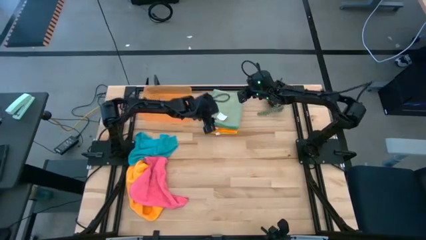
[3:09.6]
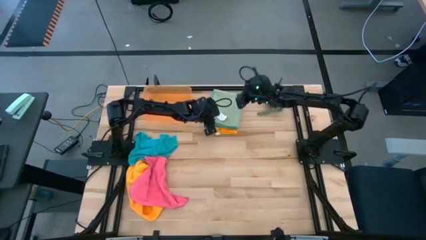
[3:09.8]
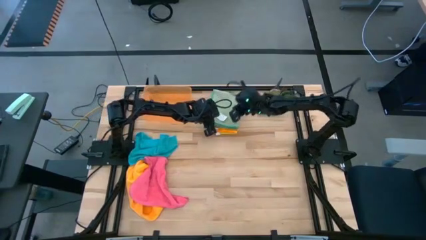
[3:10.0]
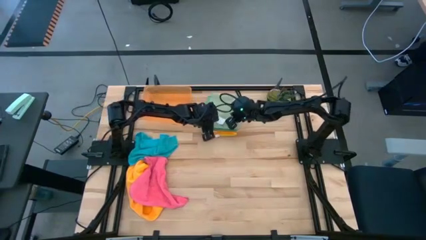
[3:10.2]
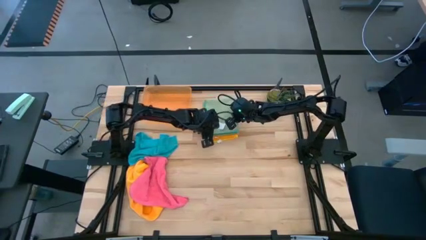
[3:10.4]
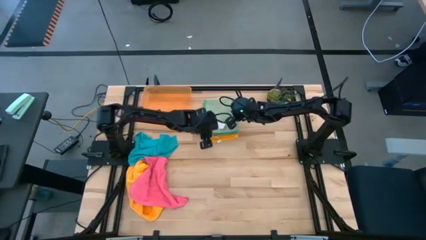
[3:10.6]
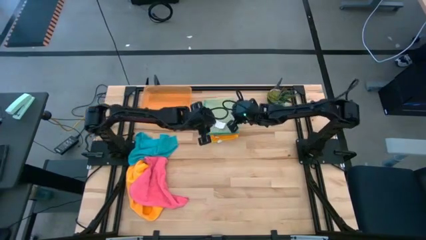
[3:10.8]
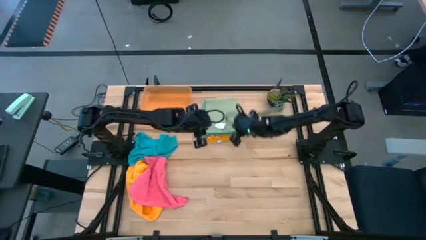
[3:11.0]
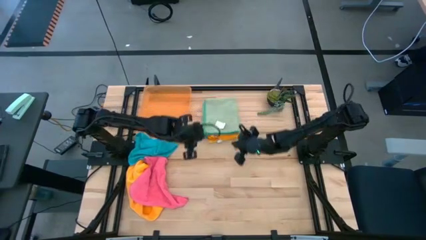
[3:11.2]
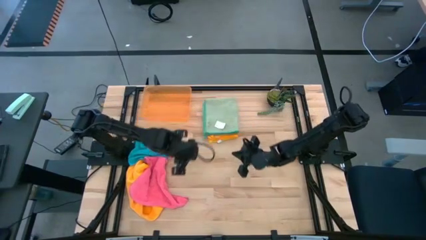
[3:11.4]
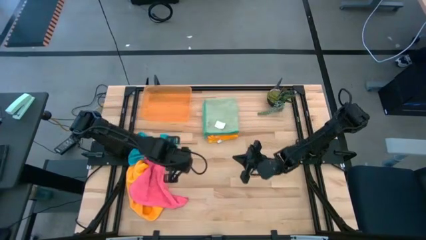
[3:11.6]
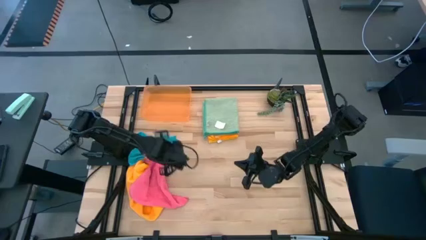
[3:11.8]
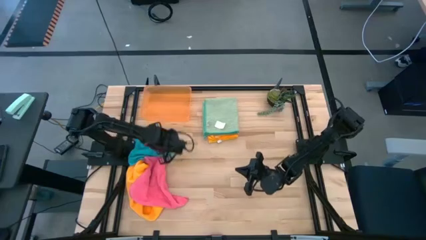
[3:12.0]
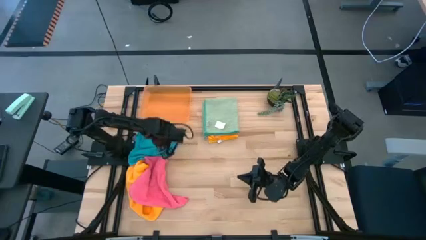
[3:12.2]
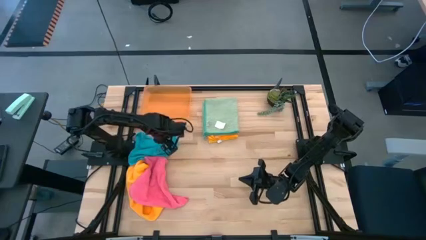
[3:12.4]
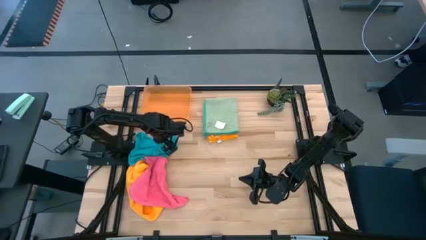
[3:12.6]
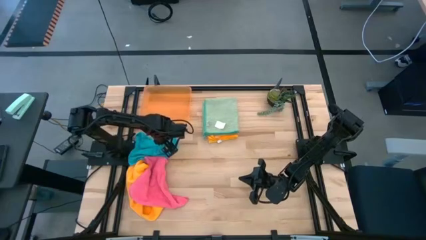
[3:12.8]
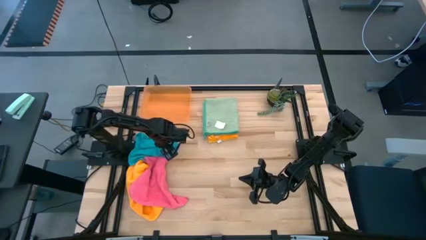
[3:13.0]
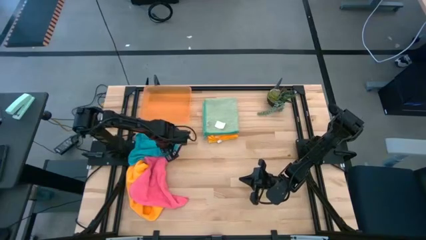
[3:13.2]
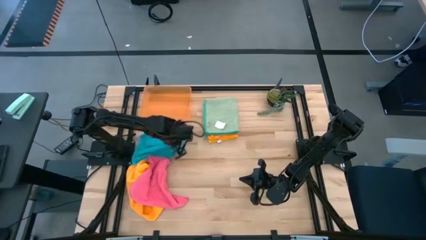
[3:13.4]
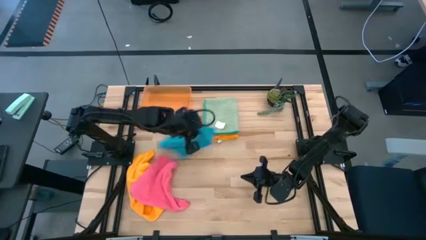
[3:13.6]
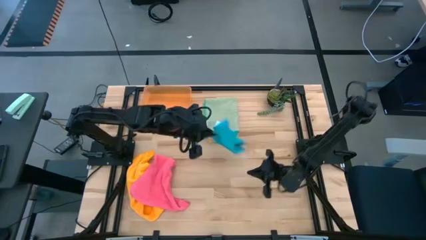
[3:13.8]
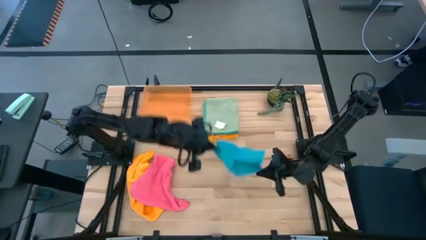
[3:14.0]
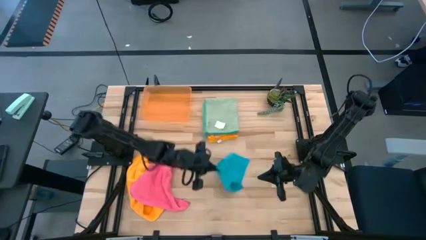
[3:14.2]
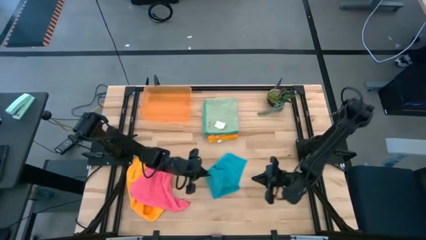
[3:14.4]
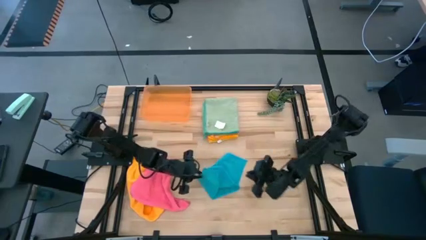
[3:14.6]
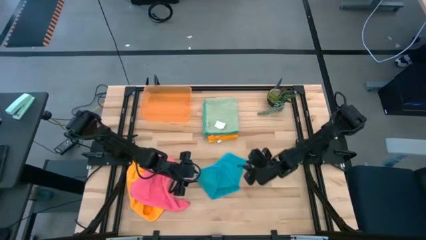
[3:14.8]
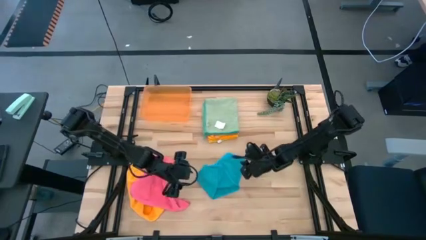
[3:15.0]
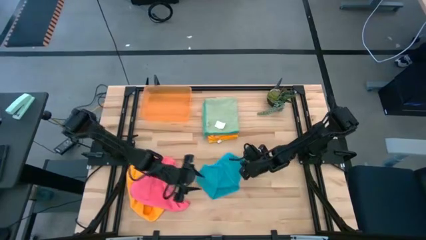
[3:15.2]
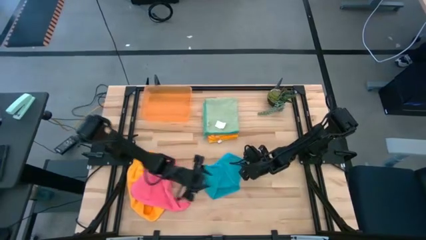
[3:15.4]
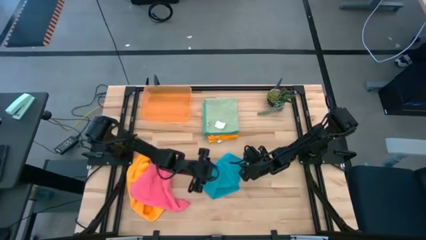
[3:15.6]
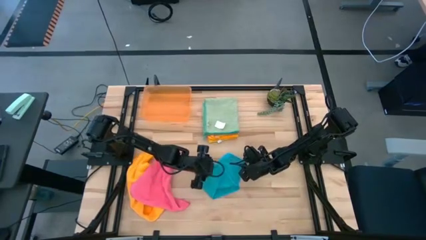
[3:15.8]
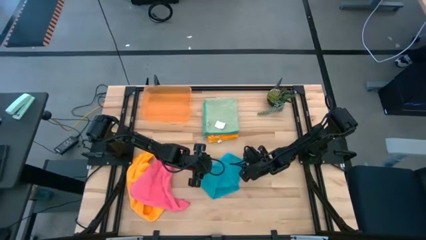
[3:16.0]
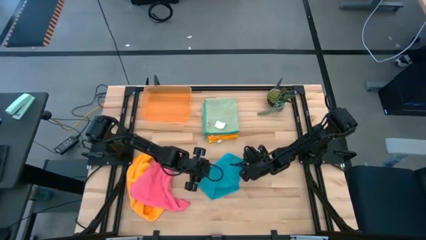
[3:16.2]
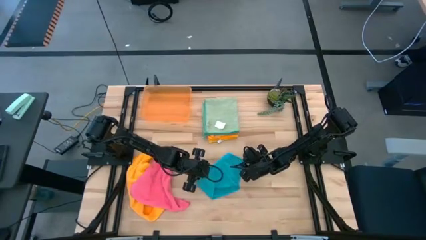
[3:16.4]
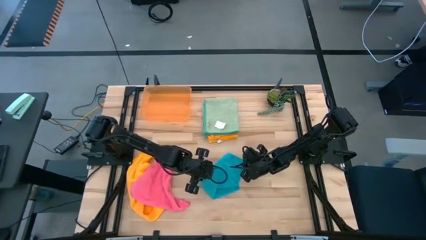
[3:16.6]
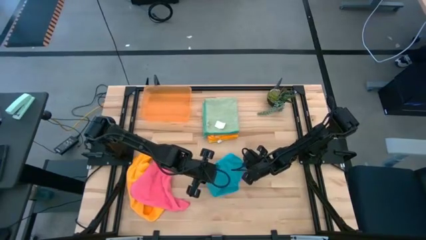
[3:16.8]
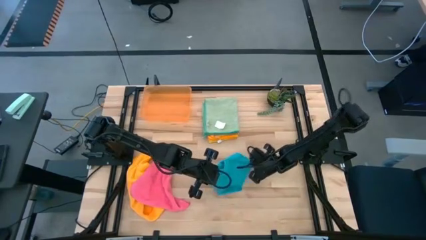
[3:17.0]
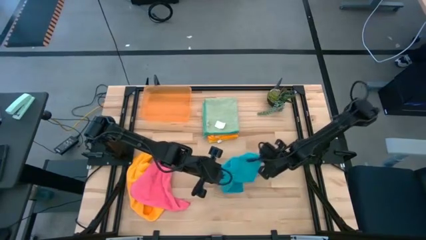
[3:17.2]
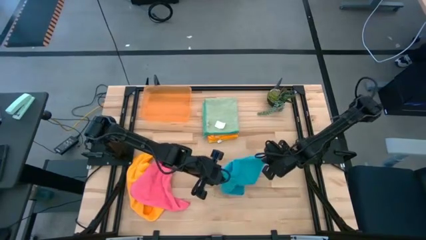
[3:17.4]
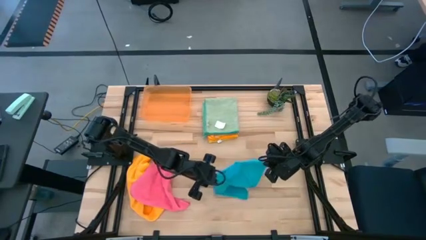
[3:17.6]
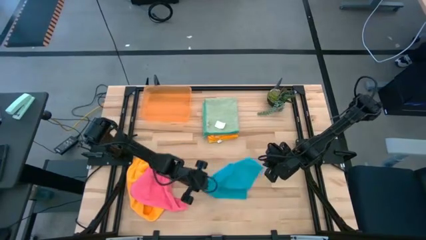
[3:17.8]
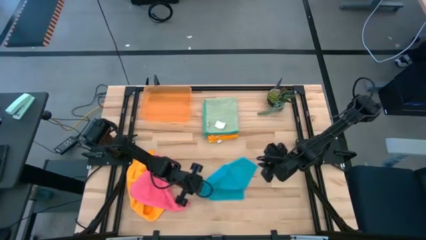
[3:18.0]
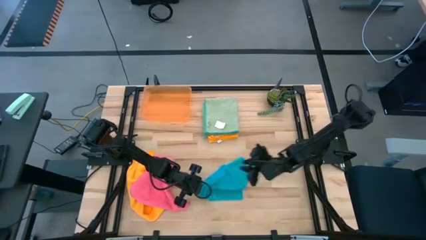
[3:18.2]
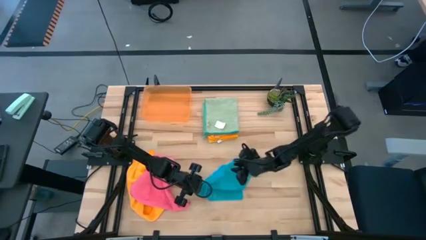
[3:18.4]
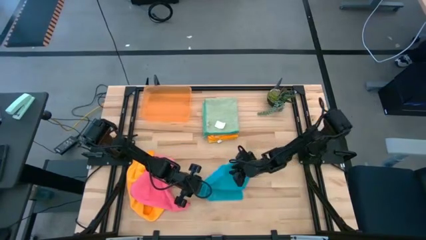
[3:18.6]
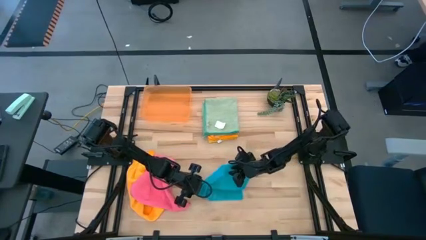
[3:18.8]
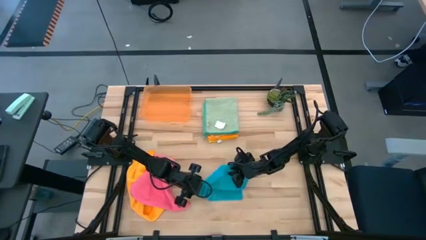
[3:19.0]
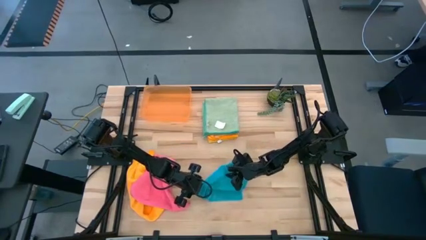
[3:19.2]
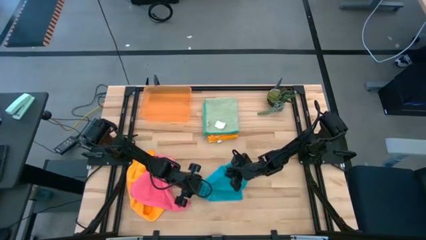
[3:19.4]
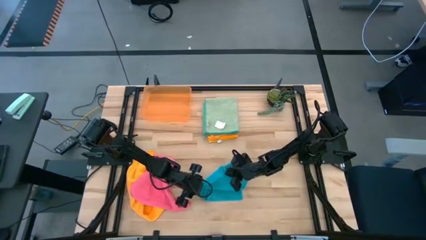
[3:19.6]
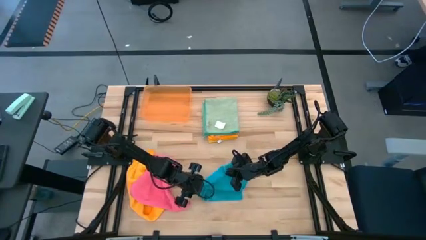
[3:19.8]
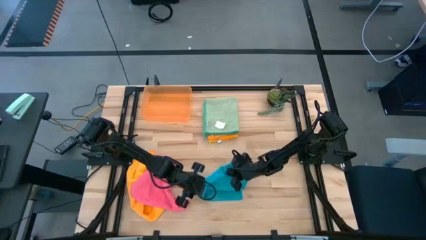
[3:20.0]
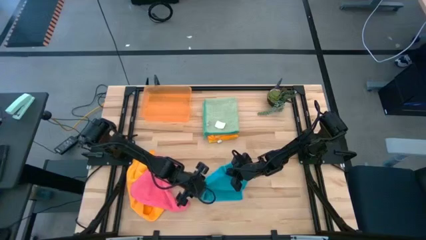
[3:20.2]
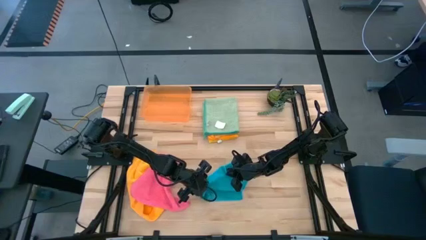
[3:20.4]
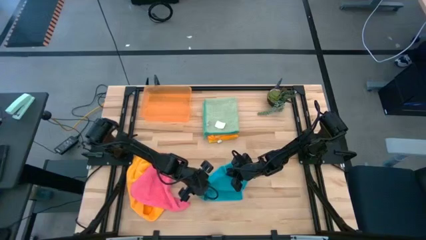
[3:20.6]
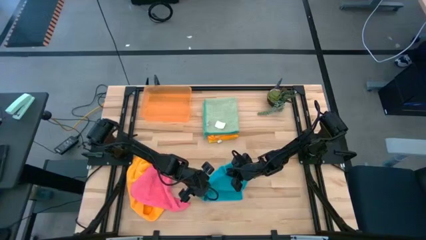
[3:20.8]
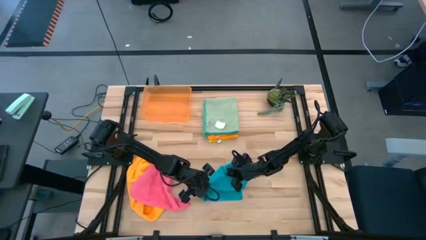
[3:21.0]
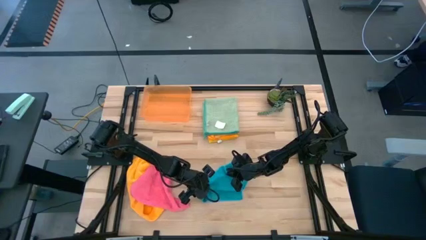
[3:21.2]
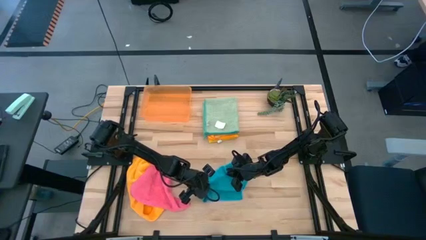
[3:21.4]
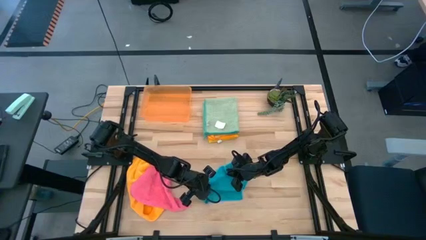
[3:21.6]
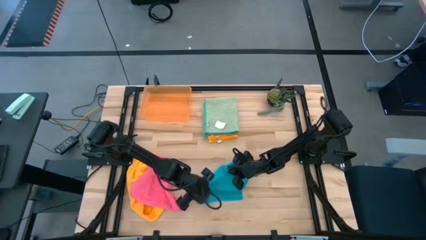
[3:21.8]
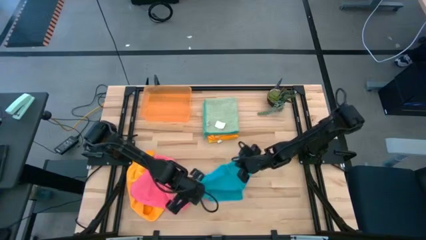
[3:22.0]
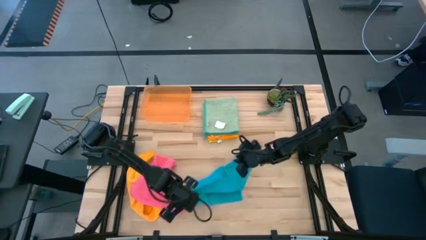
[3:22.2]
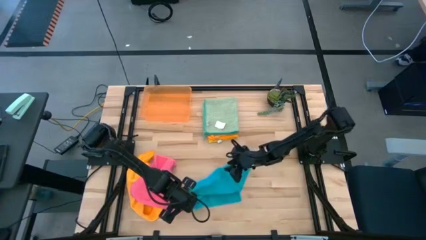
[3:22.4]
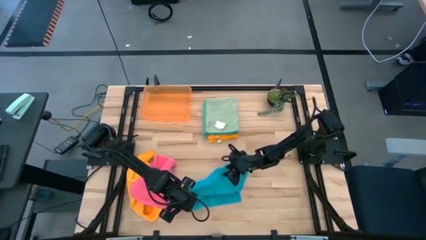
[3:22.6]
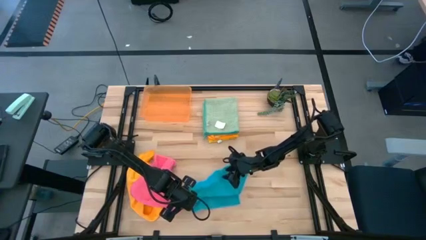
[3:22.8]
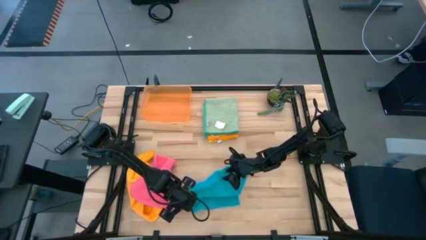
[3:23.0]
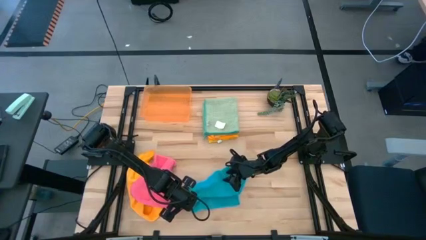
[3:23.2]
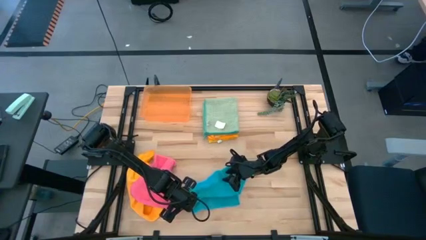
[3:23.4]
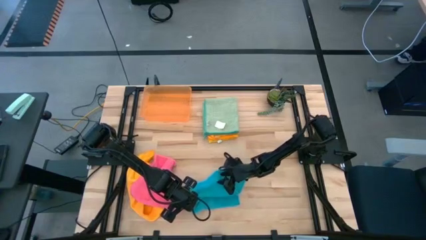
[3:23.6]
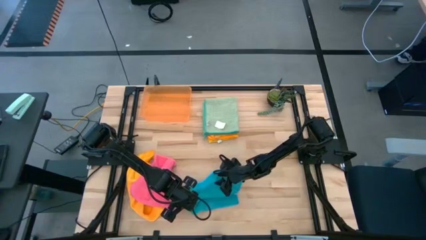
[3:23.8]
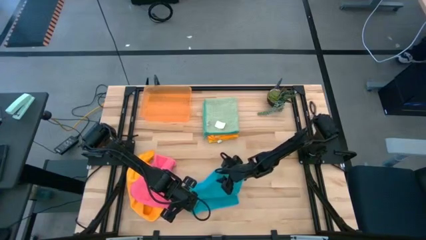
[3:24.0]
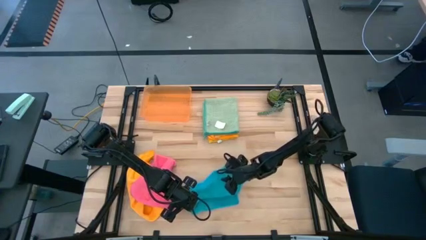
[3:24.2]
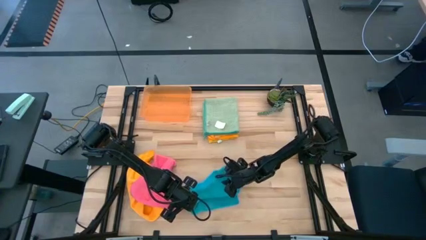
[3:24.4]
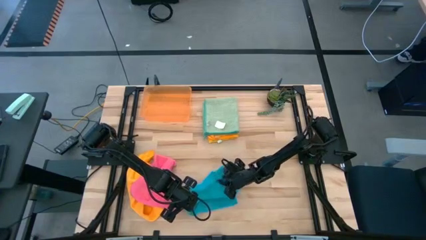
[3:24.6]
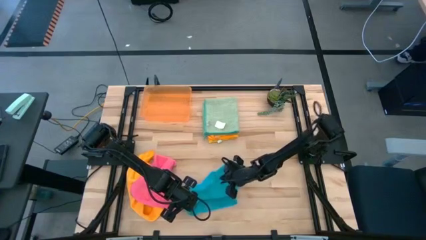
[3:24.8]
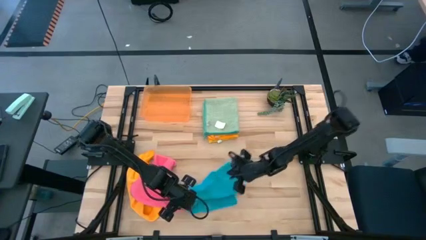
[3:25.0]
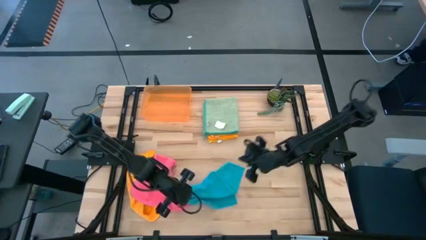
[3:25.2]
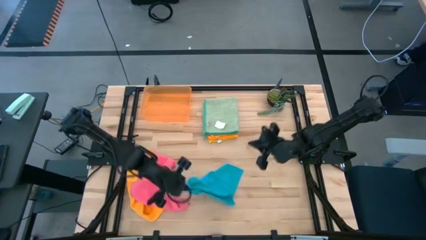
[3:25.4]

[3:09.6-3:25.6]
Task: Fold microfiber towels
Fold the blue towel
